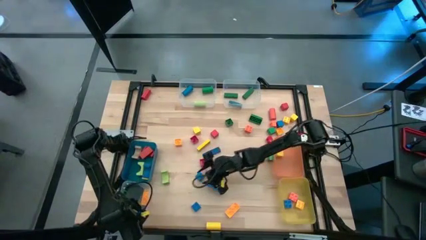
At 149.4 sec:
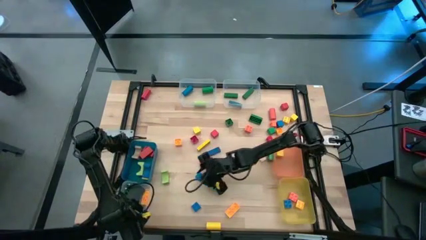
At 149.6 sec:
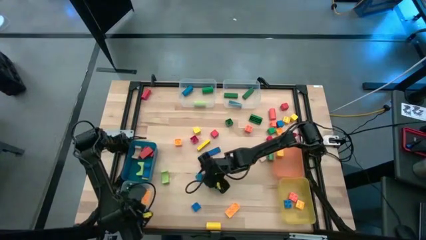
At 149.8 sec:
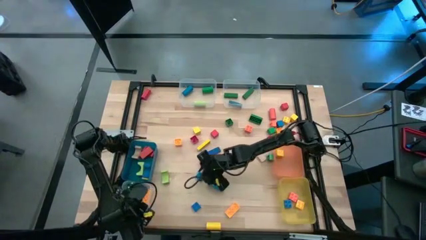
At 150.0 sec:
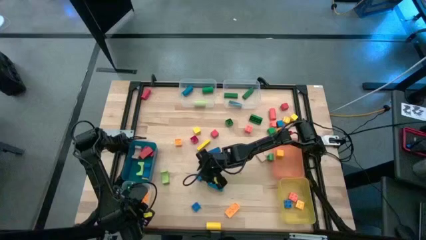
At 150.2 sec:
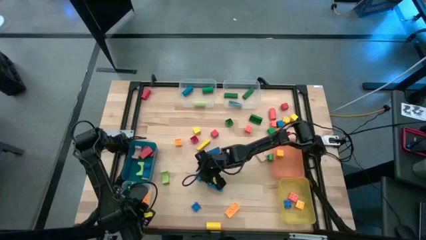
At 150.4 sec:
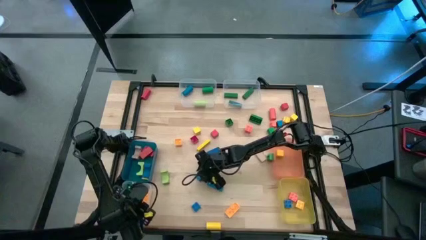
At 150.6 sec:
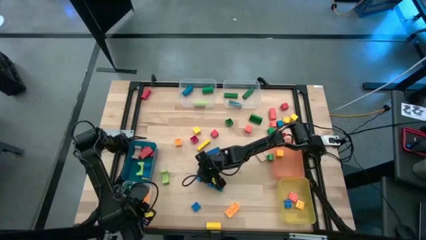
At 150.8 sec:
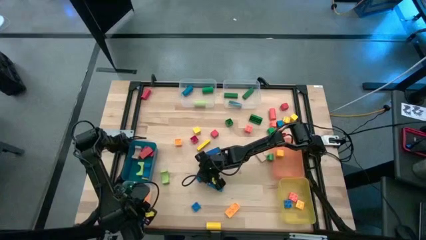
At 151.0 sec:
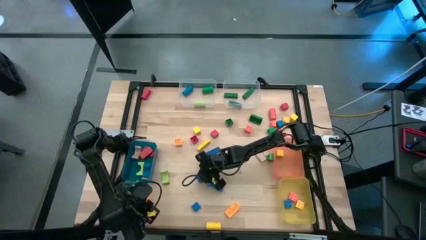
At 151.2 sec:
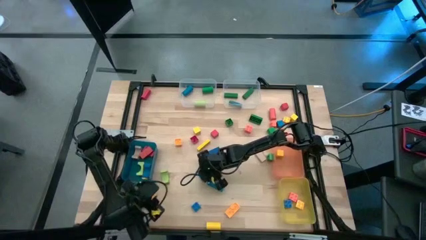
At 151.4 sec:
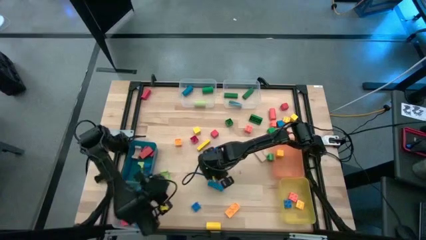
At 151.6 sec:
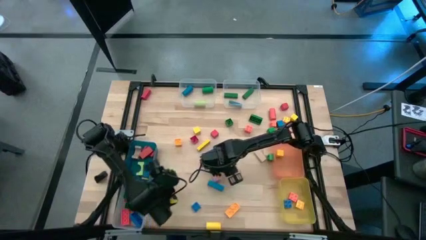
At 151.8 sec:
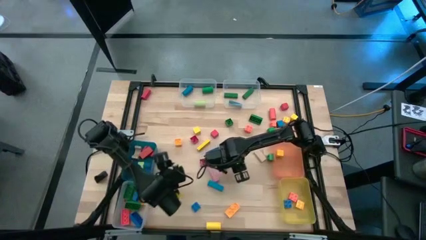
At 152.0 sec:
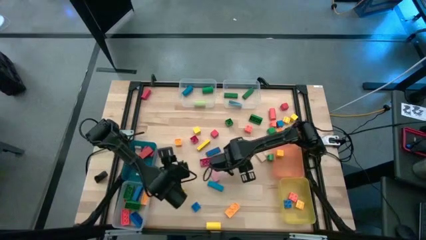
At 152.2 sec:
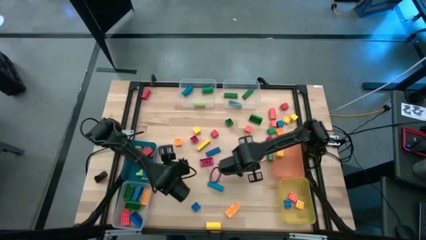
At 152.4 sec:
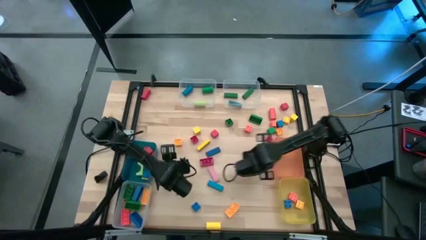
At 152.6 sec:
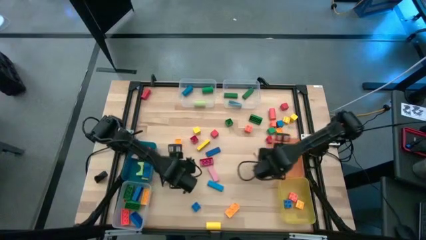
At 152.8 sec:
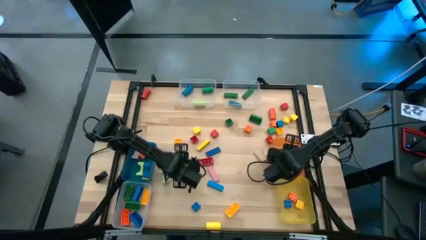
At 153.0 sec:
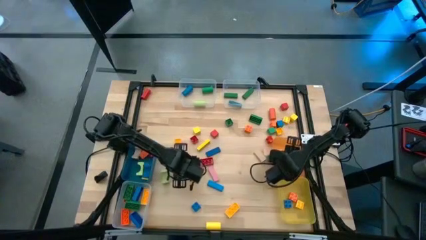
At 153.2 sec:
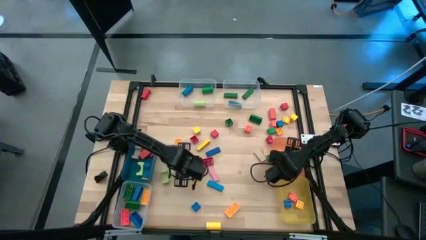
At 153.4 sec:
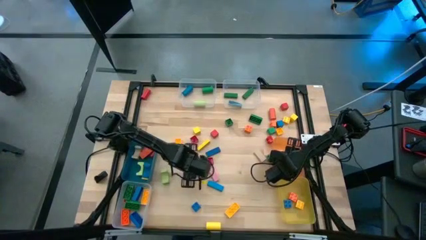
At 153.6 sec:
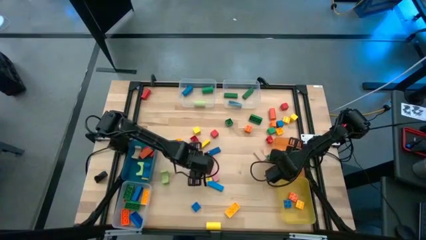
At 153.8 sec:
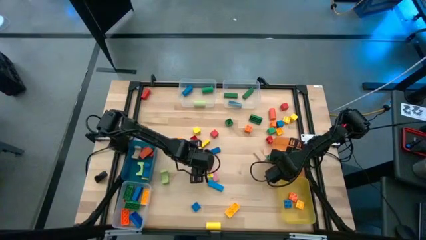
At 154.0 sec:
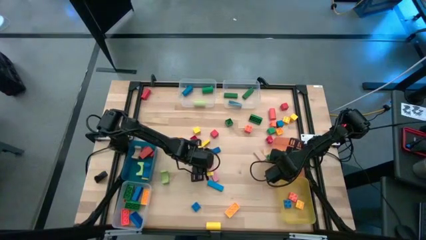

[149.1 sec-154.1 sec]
Task: Sort blocks by size
Put the blue block into the orange bin

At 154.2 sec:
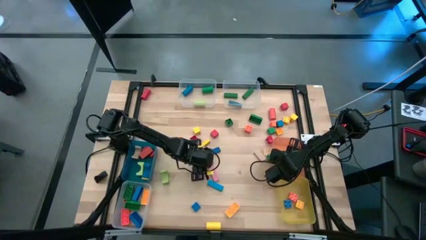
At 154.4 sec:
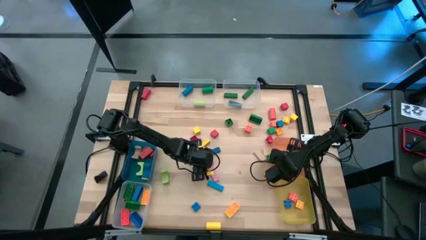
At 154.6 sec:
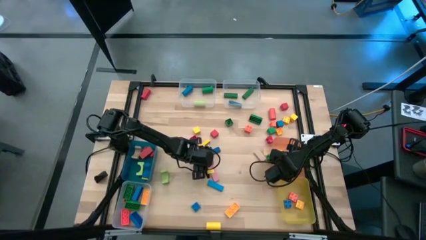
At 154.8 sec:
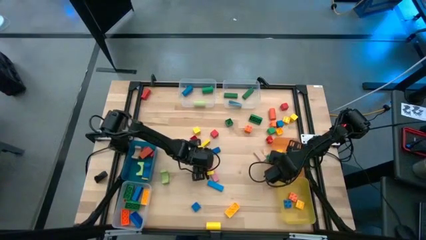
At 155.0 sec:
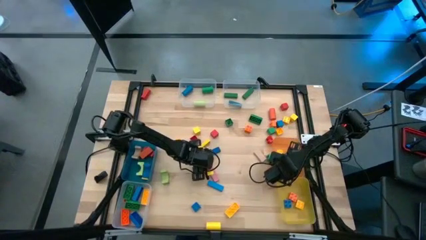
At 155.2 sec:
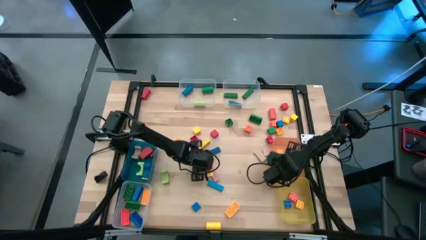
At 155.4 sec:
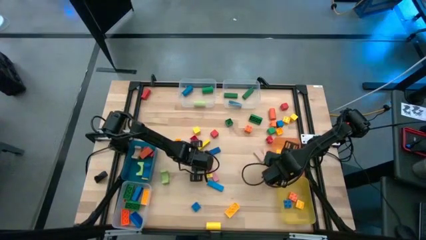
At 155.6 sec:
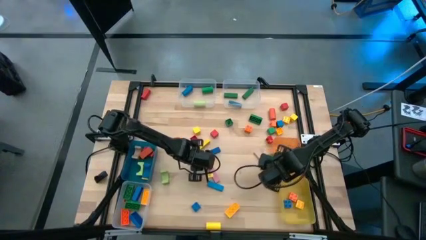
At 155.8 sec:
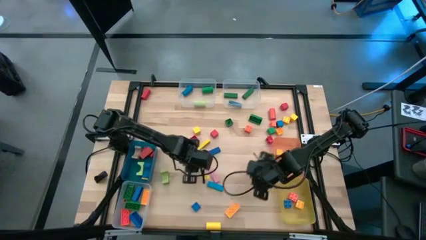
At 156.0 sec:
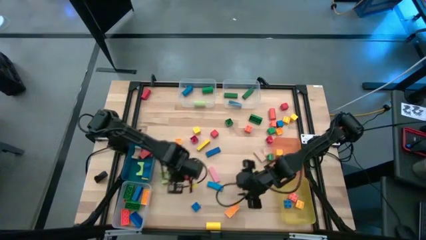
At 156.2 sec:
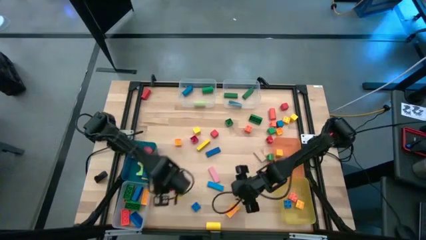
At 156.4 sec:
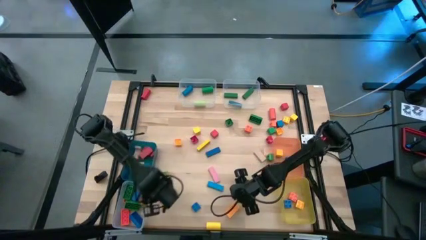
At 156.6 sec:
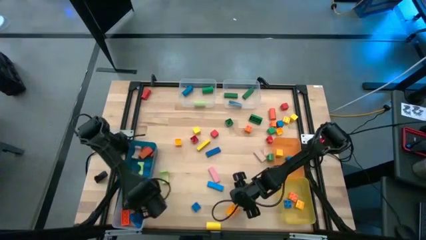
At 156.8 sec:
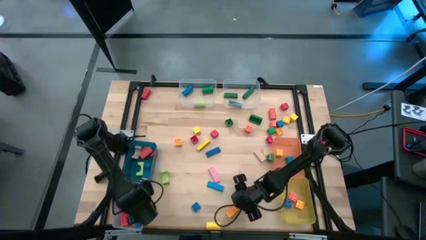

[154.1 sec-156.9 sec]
Put the red game piece into the bottom right transparent bin

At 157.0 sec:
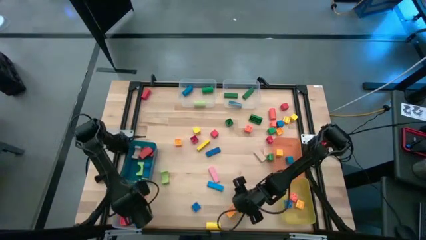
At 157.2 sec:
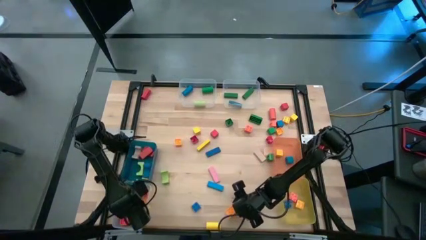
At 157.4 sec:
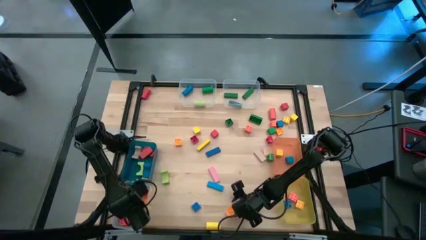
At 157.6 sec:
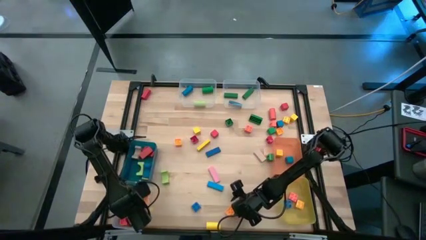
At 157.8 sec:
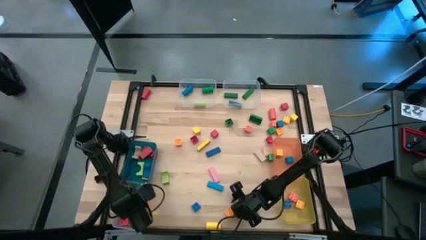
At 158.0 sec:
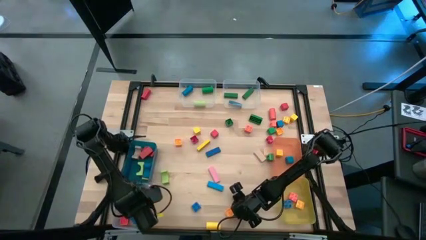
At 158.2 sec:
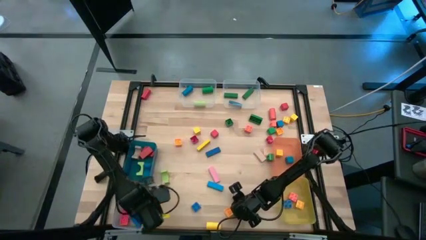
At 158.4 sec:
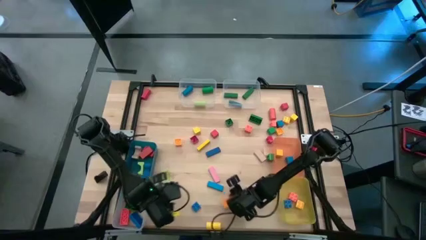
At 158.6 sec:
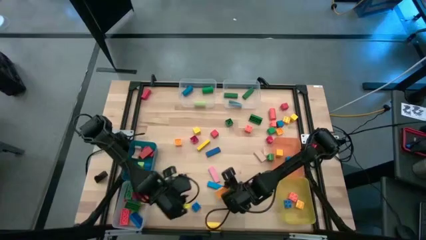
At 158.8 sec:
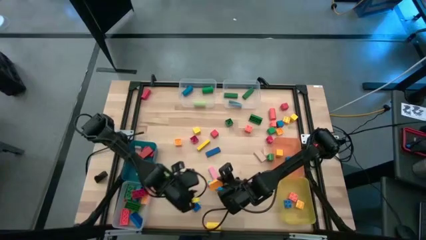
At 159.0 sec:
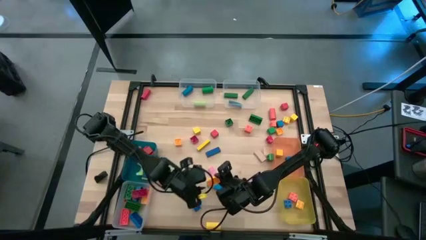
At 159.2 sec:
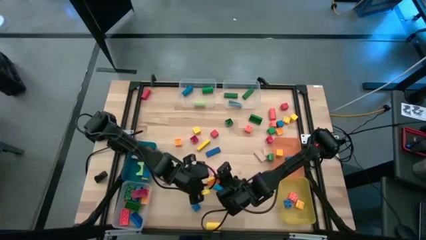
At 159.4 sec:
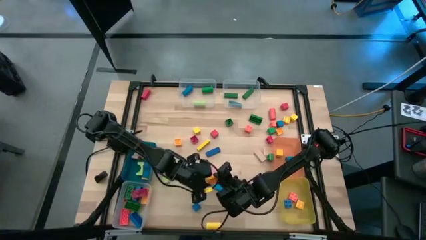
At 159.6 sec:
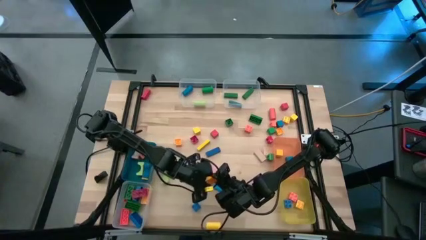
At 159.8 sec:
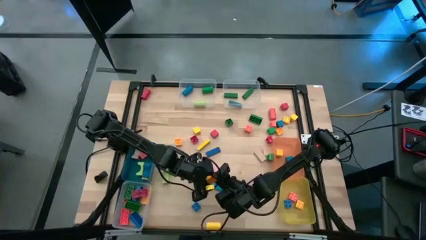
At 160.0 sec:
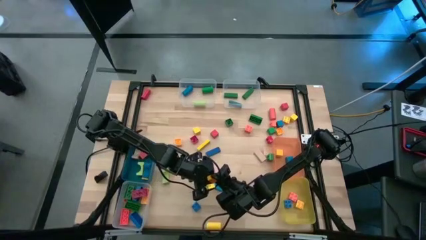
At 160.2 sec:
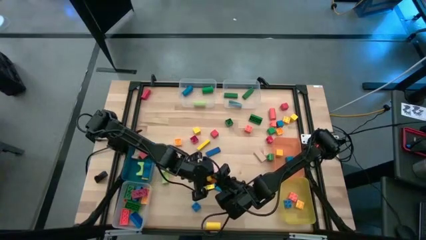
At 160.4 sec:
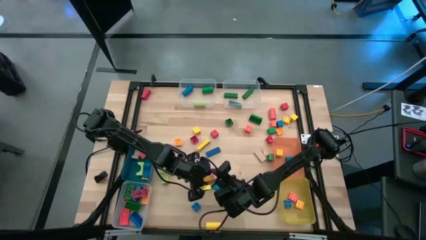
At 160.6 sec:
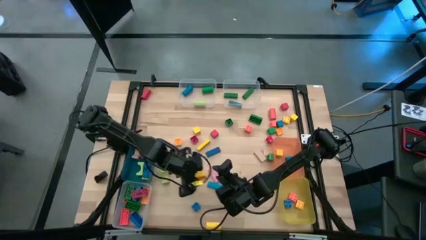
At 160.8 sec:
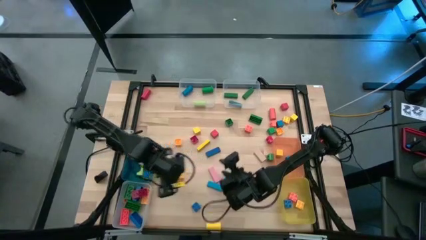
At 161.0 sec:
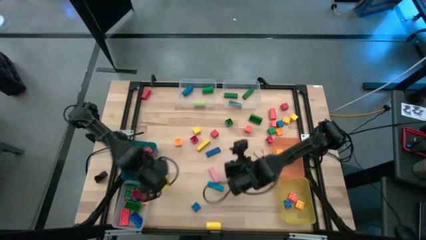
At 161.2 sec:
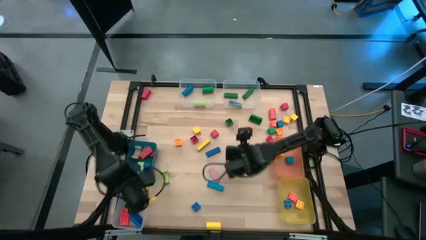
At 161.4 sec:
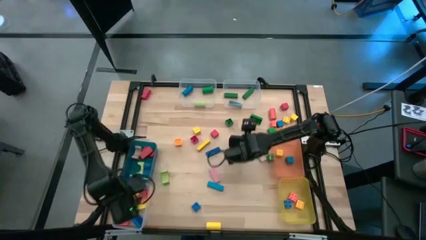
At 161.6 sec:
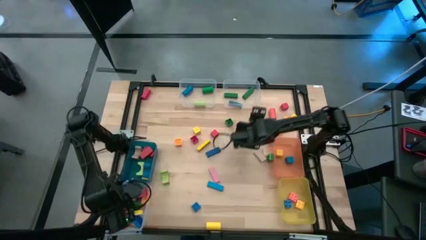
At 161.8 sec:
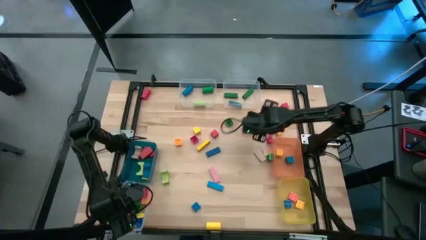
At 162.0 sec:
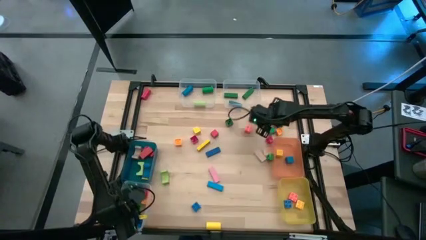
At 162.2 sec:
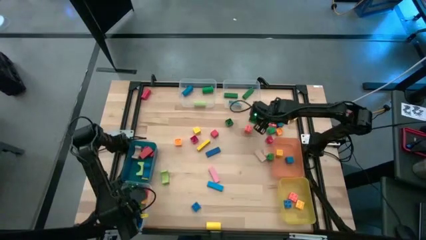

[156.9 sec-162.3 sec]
Put the yellow game piece into the bottom left transparent bin

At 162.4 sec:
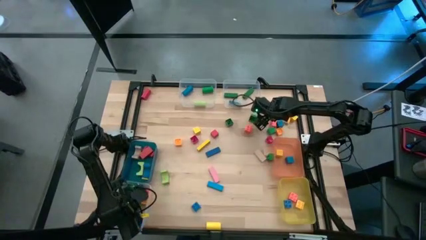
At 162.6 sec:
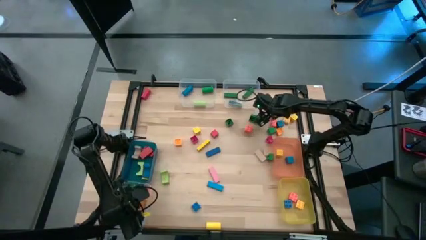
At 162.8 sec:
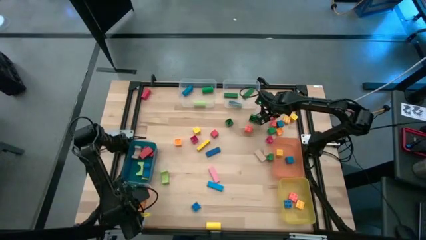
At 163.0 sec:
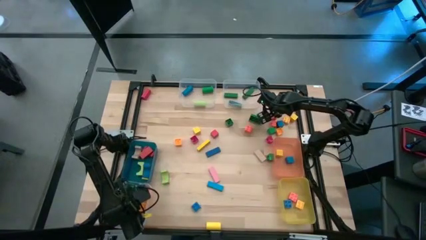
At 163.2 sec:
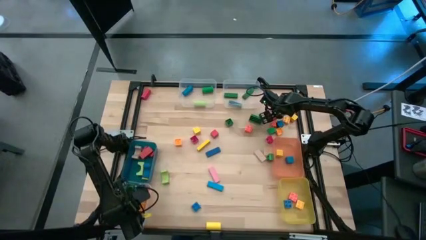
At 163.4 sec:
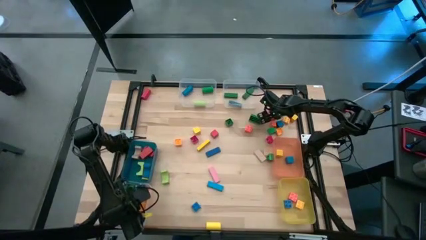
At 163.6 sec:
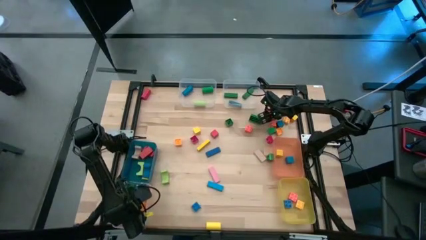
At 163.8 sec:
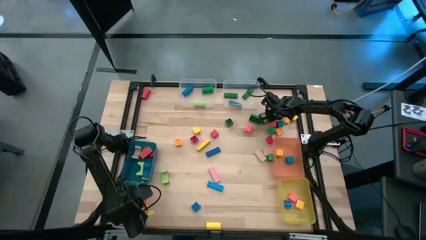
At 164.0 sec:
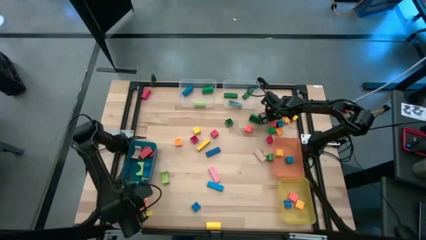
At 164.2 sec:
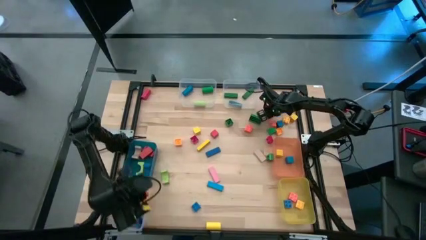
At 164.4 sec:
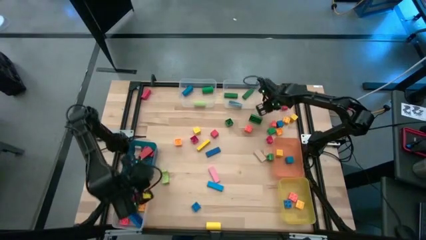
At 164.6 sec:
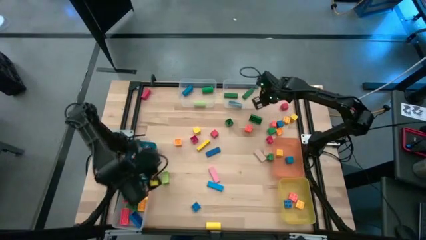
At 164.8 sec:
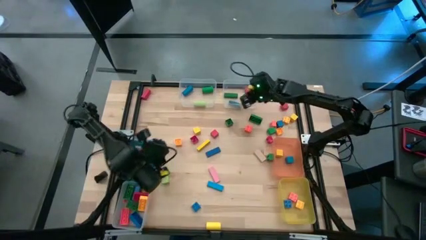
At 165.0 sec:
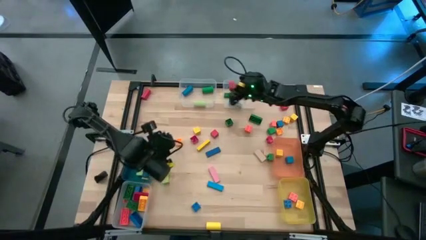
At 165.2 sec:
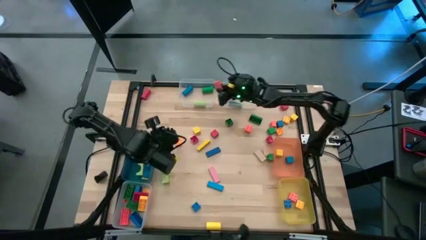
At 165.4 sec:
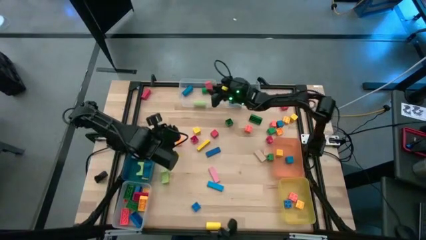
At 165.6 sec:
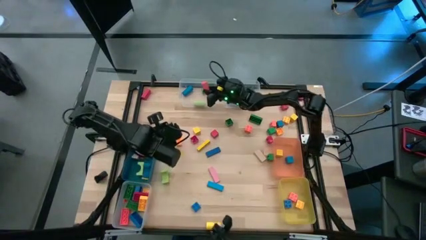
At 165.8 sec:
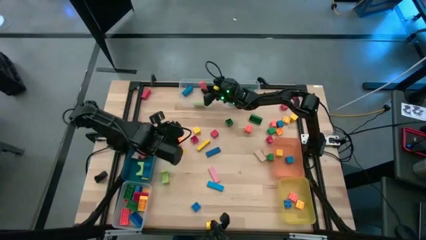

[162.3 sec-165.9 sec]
Put the orange block into the top left transparent bin
